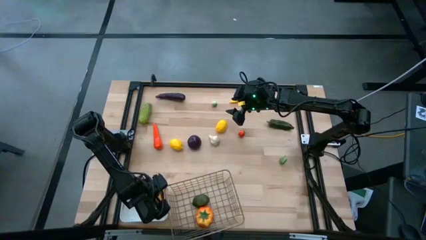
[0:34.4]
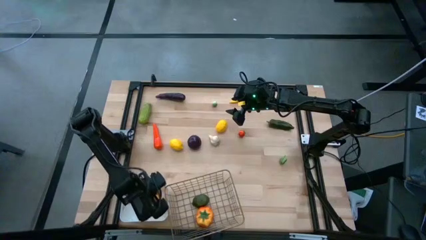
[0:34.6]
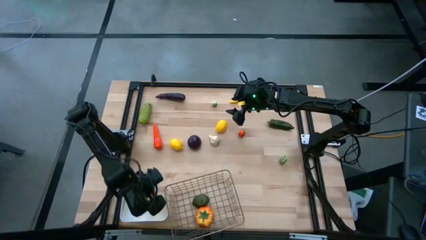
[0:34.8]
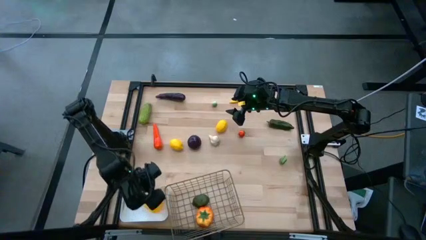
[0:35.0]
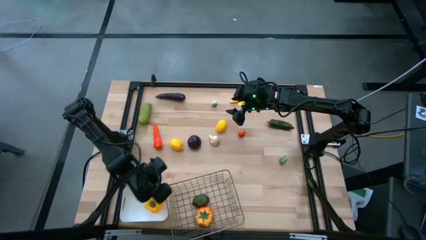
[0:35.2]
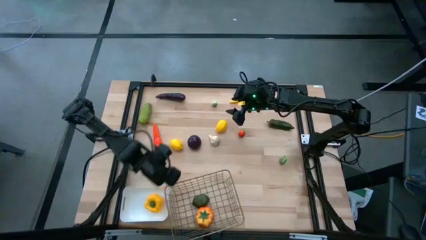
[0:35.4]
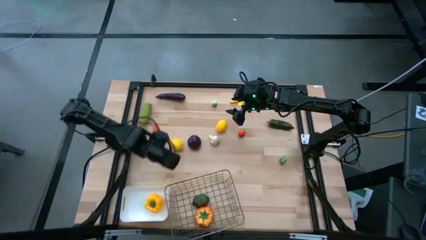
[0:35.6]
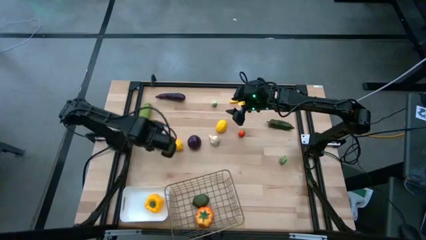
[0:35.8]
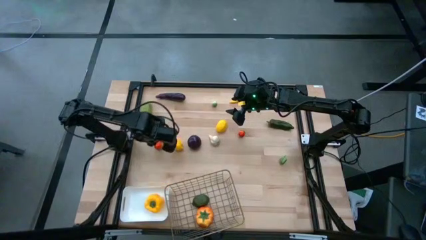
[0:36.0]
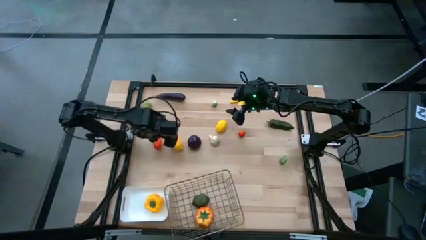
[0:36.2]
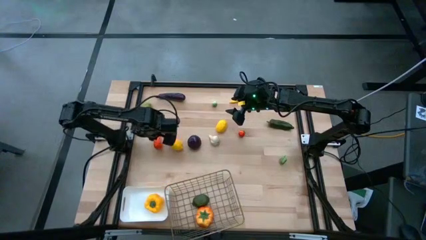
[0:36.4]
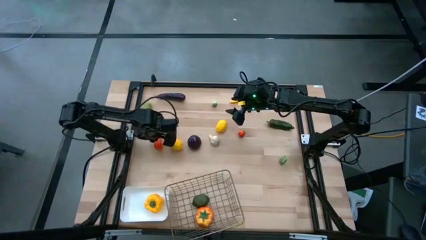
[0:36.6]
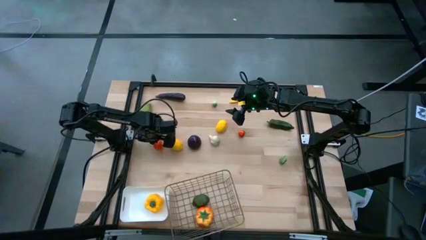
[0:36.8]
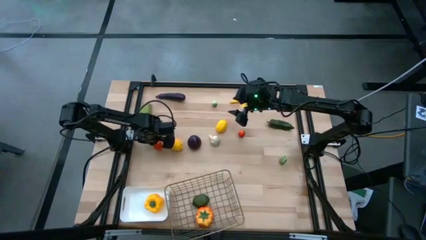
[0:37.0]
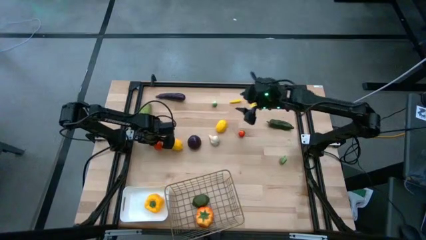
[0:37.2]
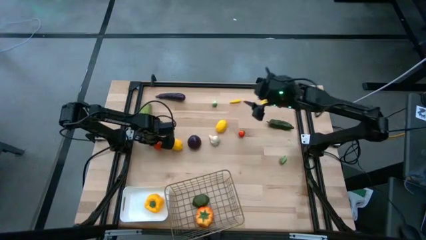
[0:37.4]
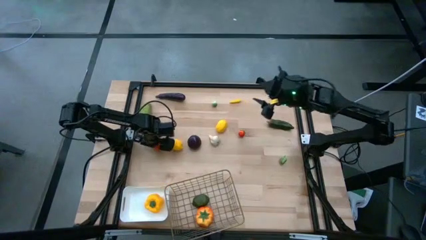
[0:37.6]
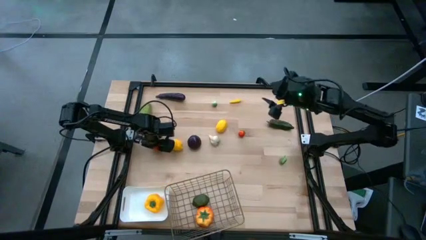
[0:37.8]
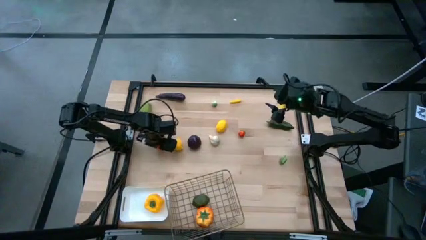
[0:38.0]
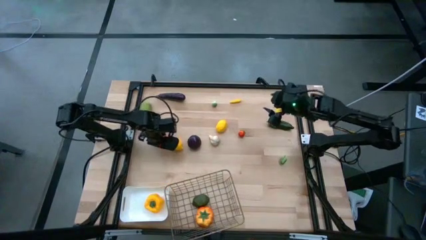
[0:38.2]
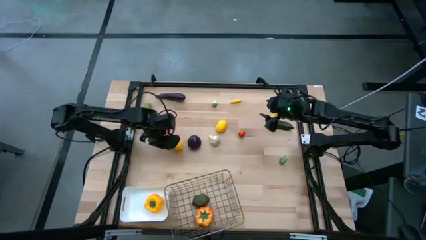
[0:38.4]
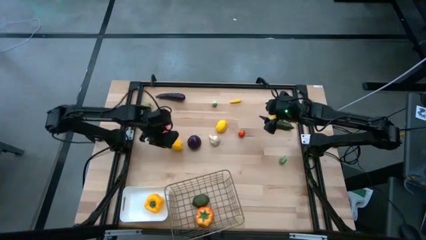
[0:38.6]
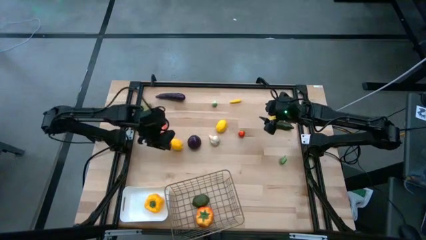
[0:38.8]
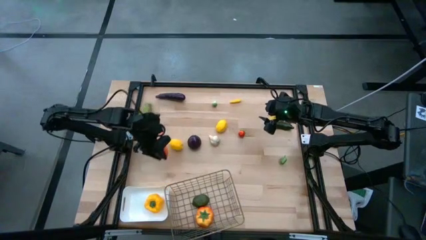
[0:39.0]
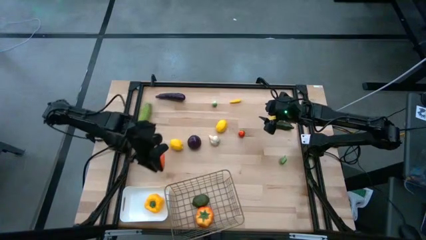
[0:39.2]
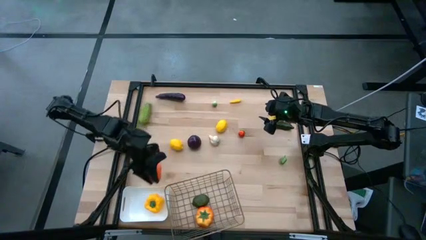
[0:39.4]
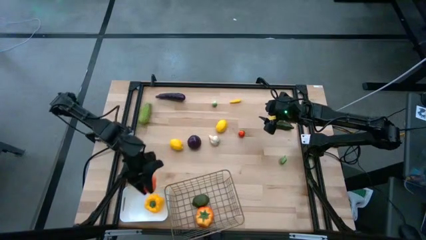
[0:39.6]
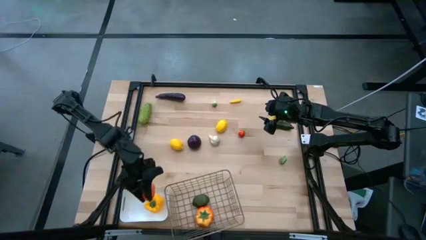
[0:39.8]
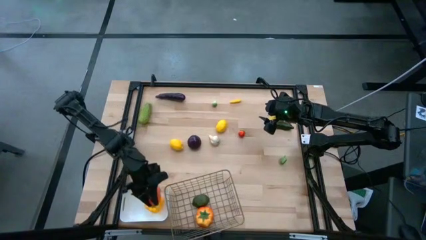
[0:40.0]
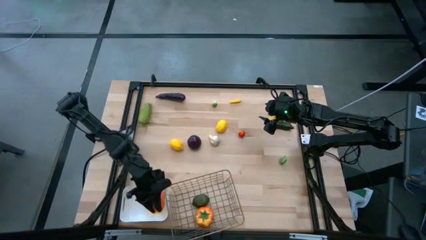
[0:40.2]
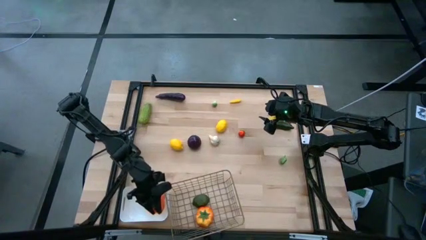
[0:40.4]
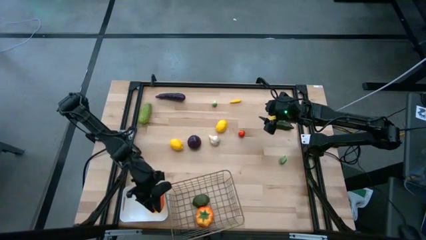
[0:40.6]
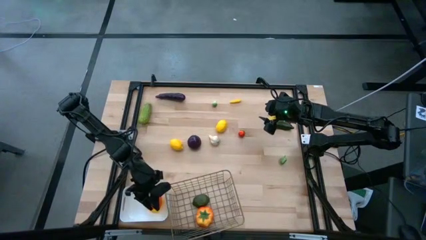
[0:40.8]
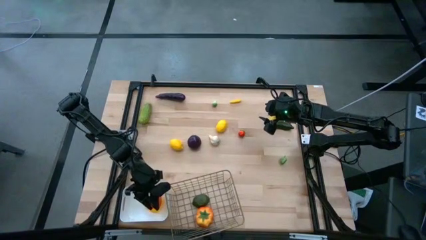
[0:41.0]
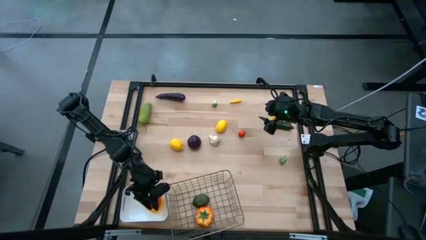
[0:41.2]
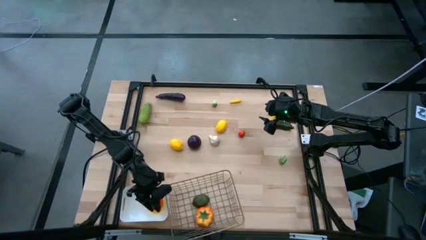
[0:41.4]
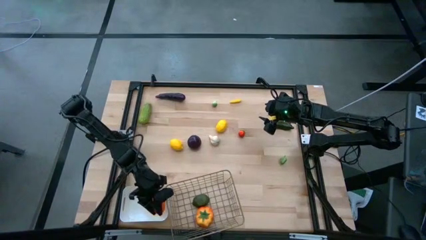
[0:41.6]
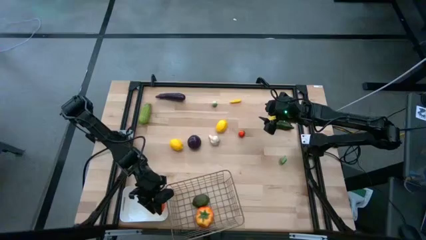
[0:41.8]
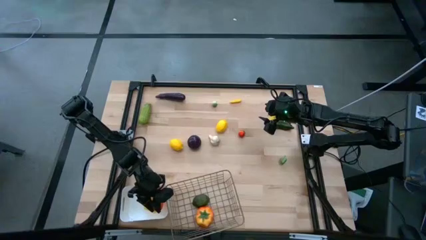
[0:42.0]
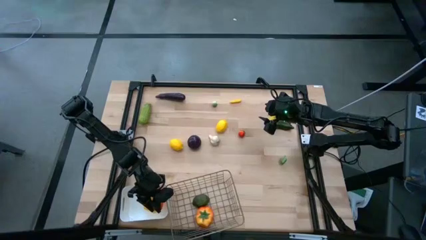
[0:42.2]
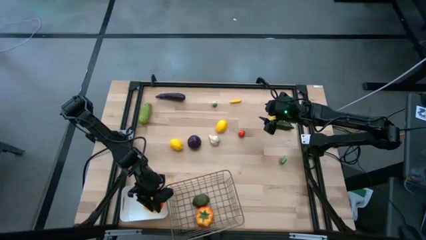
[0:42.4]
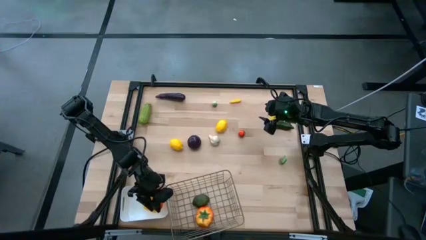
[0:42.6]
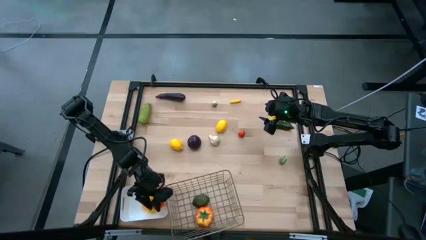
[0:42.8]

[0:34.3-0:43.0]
Task: Sort produce into baskets
Put the orange carrot into the white bin

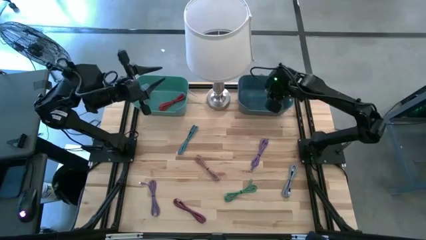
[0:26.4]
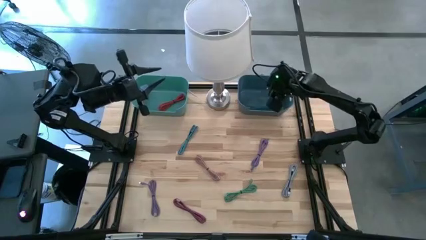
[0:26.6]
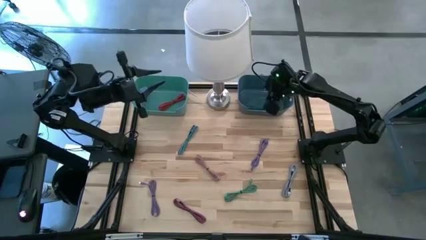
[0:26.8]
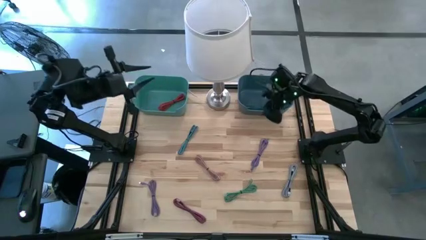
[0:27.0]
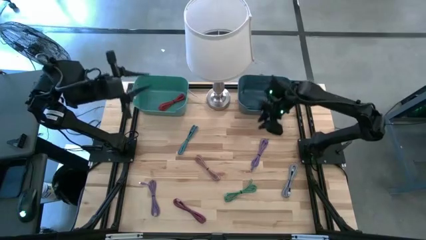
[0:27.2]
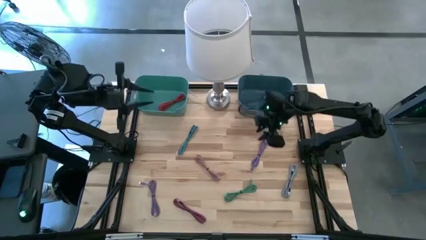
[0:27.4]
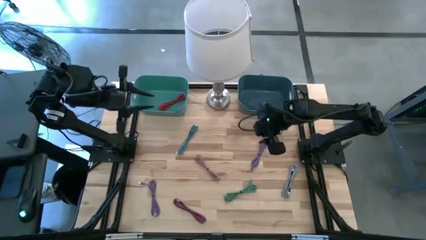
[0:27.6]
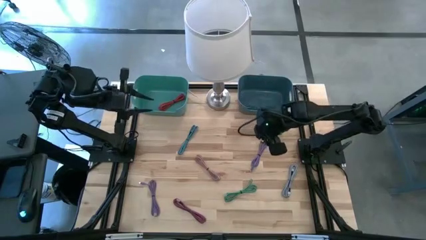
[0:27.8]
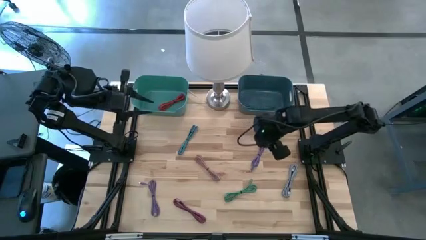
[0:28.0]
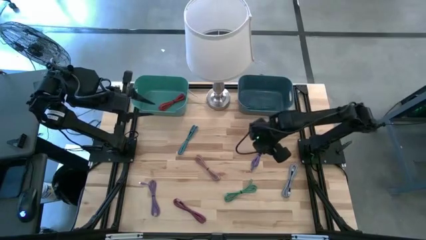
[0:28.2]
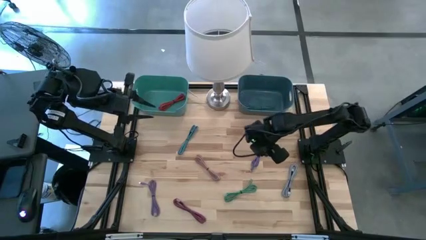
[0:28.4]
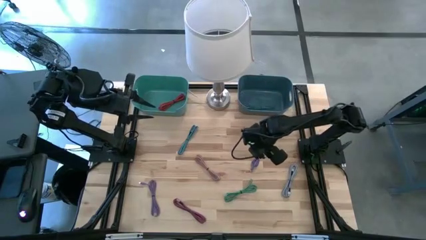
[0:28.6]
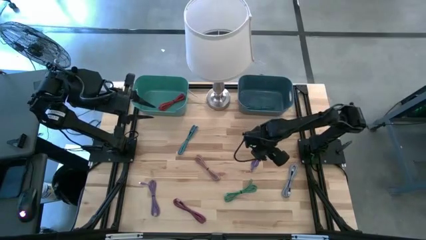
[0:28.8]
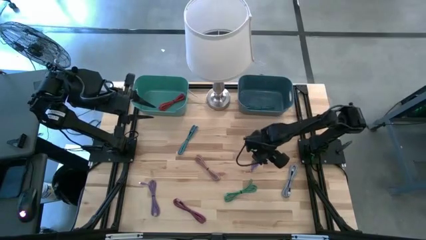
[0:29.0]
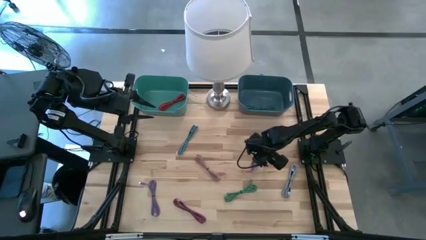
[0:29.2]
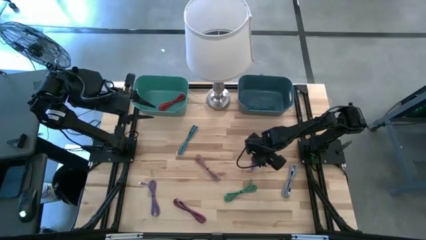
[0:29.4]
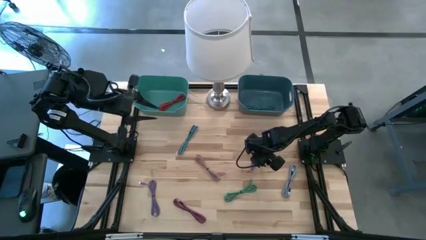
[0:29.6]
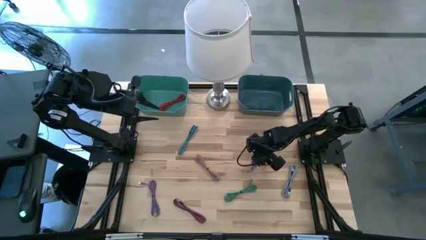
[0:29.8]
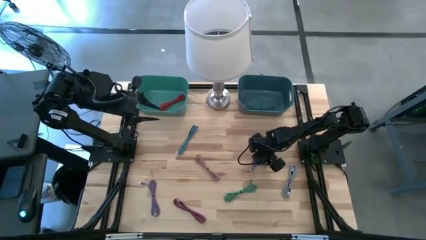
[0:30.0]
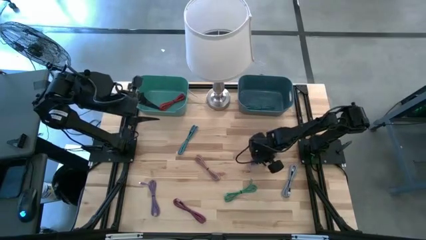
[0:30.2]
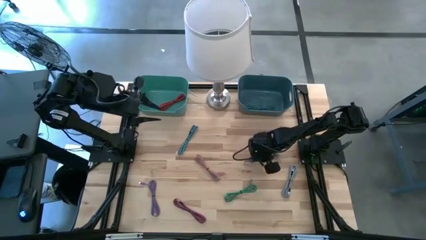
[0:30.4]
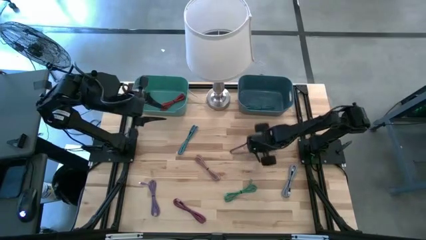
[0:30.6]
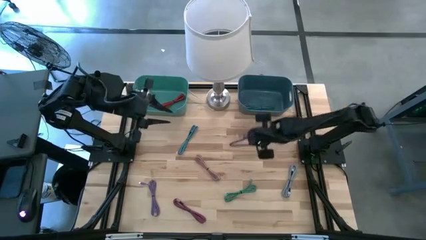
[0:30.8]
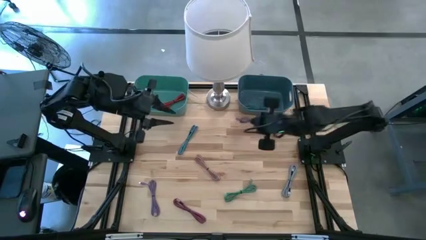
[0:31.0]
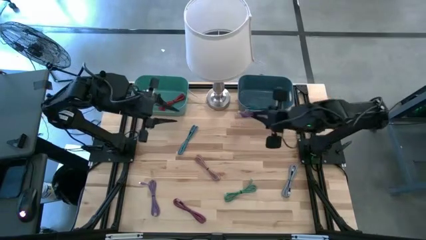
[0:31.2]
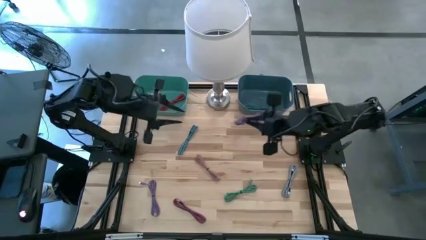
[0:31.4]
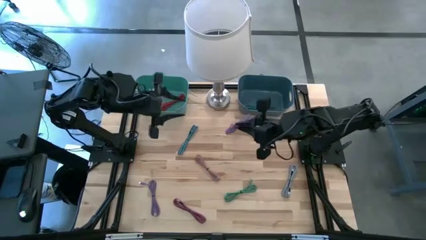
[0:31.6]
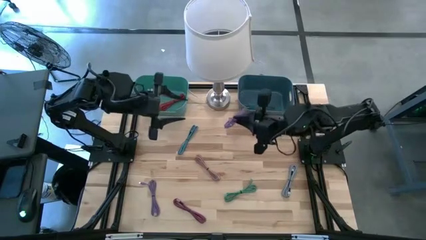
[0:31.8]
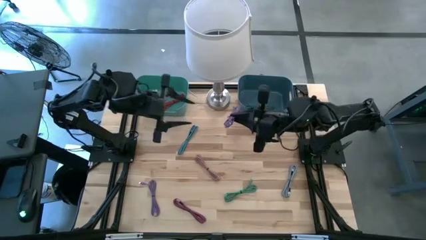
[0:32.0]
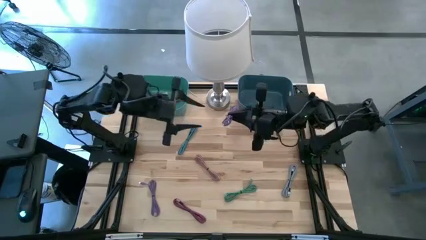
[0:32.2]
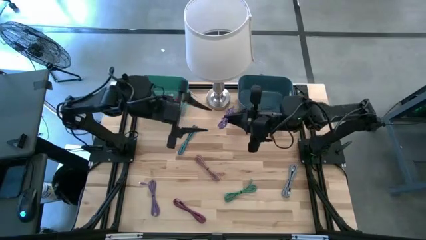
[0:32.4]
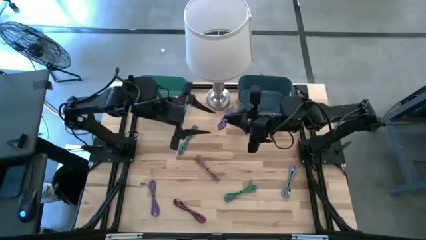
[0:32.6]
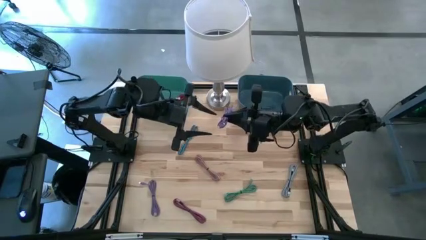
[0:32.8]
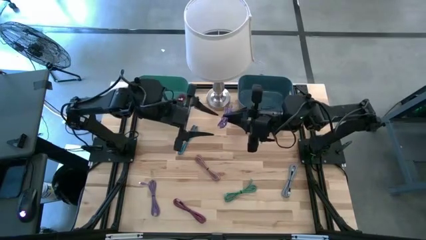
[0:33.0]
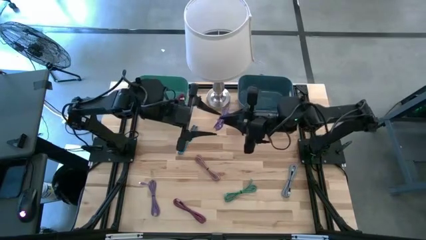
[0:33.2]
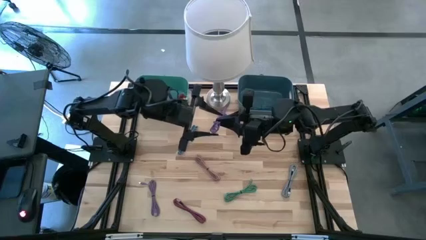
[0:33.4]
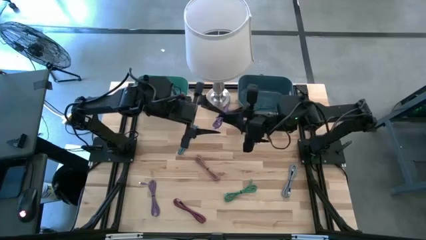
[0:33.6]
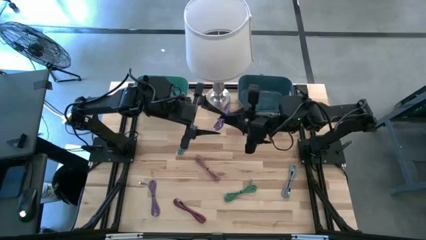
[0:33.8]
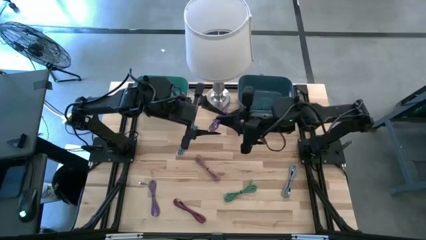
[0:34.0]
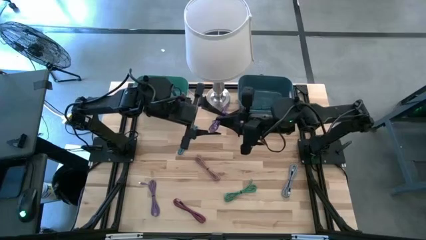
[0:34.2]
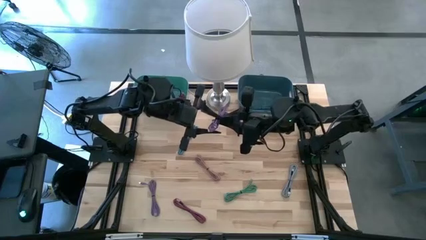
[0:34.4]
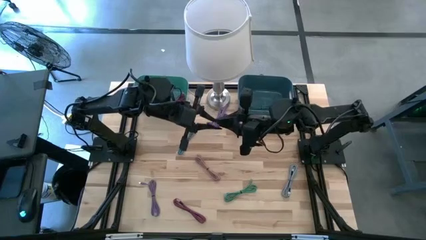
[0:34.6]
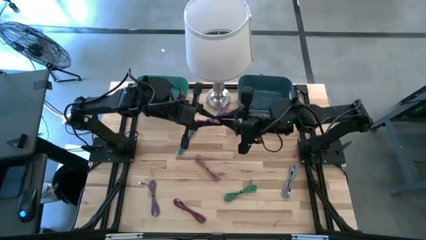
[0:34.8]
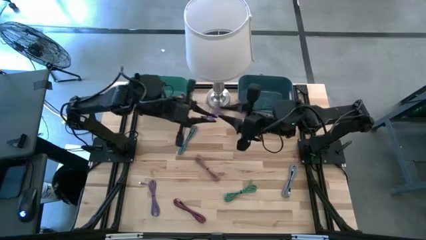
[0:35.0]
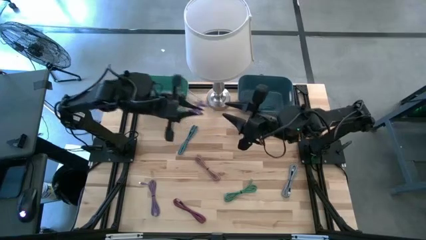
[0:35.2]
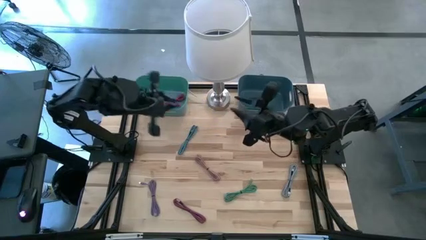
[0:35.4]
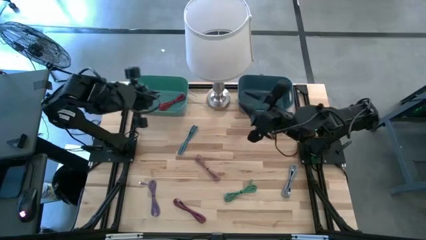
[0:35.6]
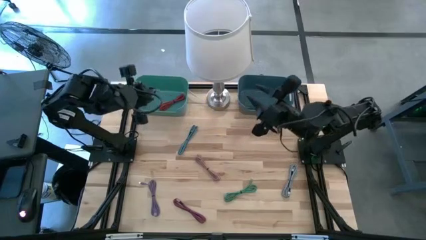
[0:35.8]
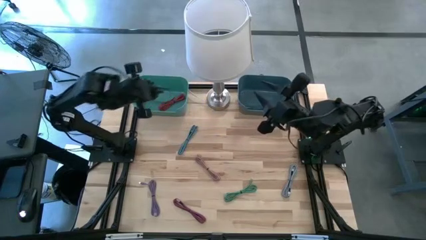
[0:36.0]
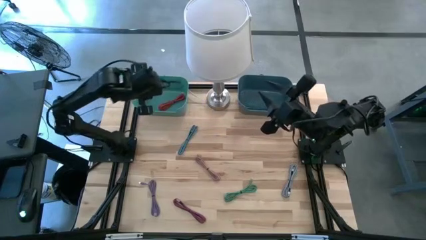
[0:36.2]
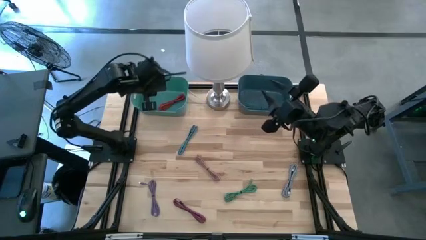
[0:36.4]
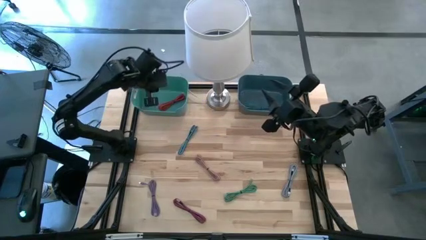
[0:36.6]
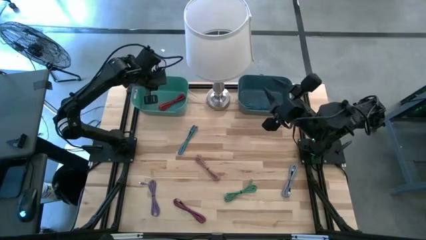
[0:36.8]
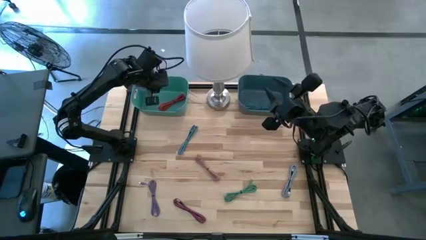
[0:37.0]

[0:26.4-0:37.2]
Task: Pick & Place USB Port
Put the top purple charger cable into the green bin
